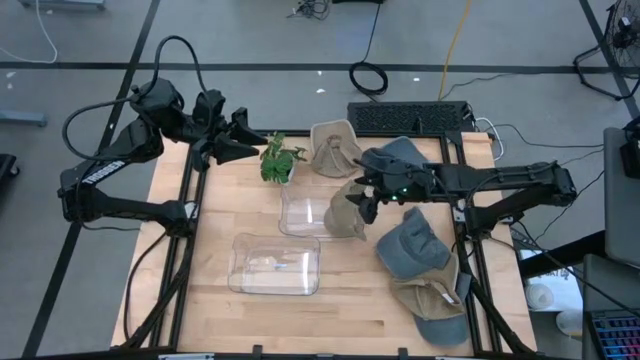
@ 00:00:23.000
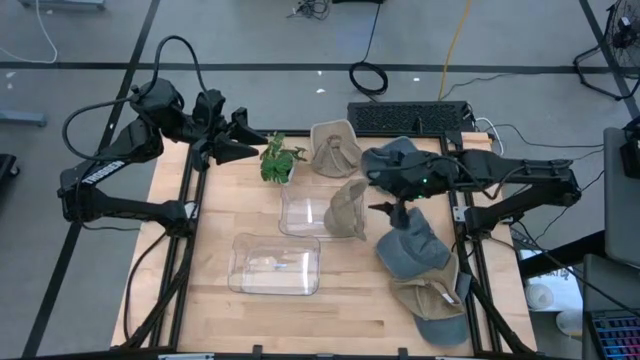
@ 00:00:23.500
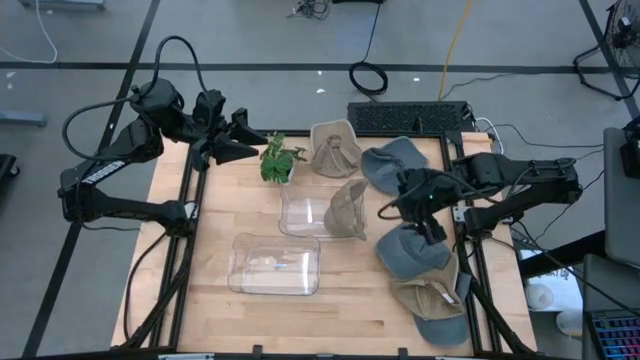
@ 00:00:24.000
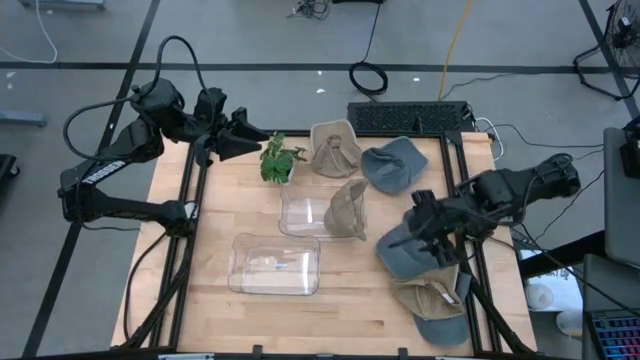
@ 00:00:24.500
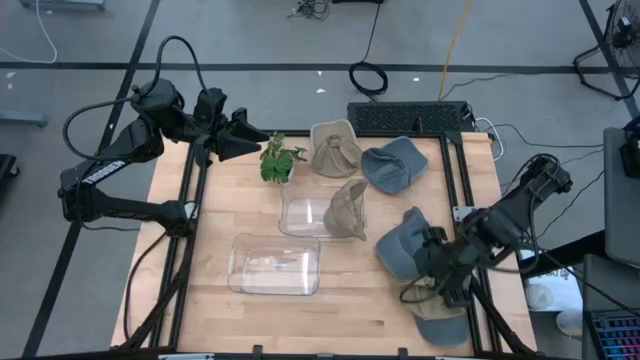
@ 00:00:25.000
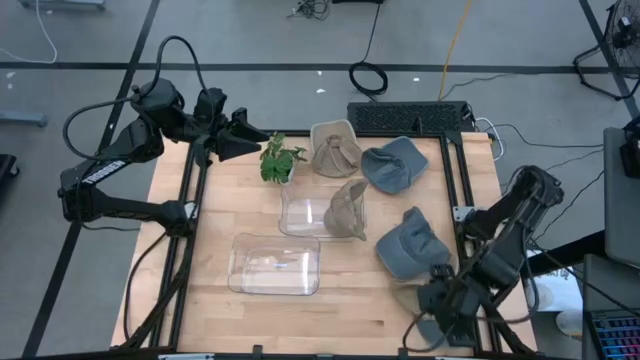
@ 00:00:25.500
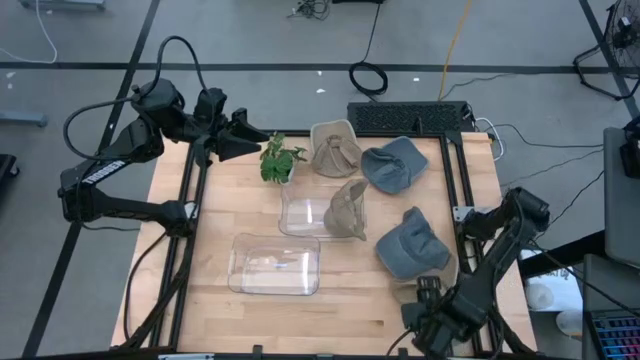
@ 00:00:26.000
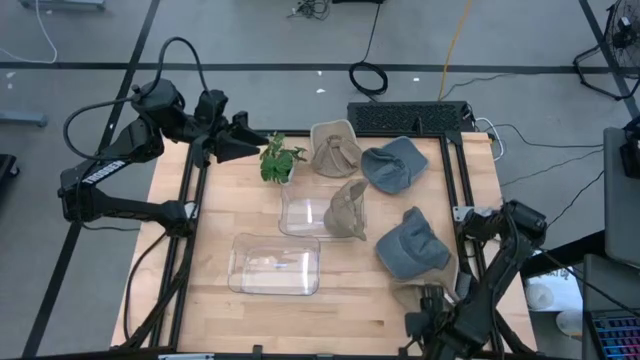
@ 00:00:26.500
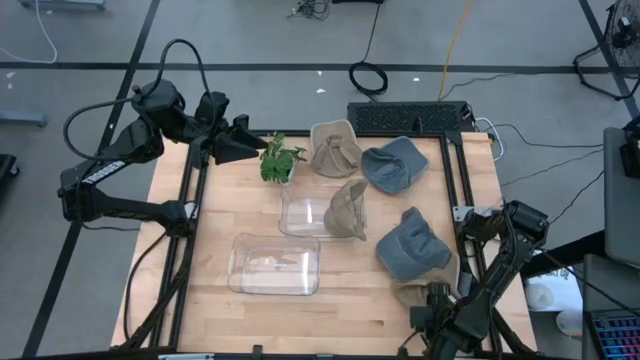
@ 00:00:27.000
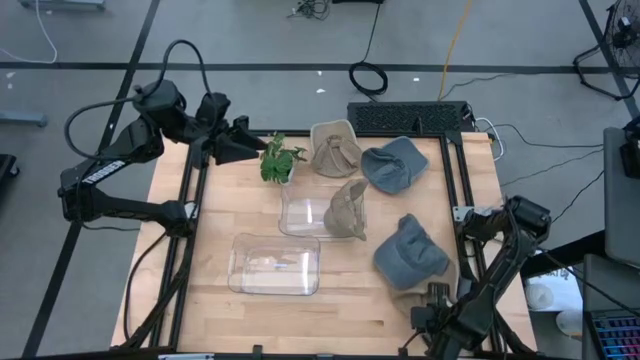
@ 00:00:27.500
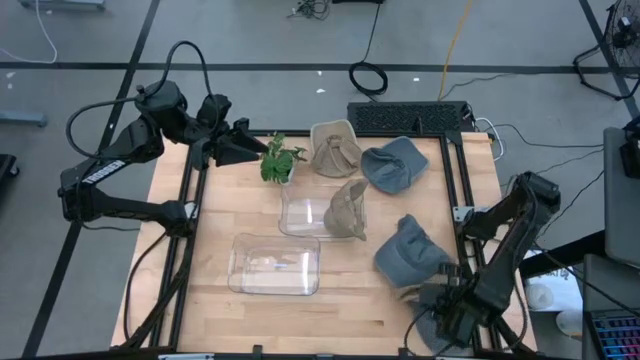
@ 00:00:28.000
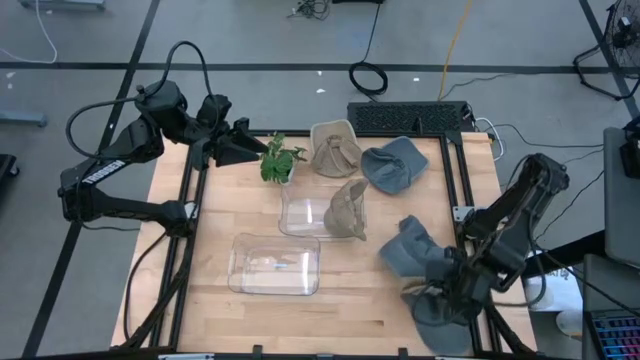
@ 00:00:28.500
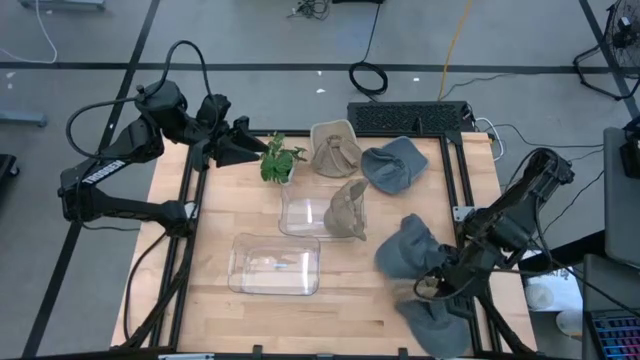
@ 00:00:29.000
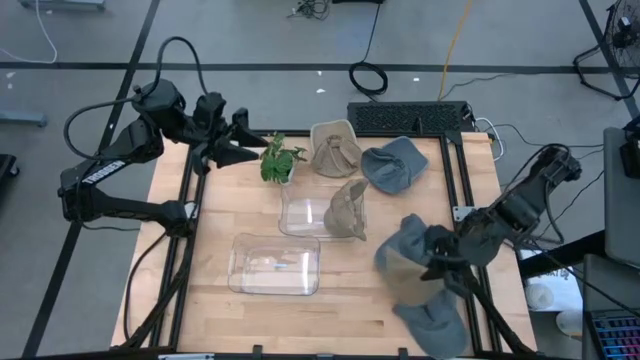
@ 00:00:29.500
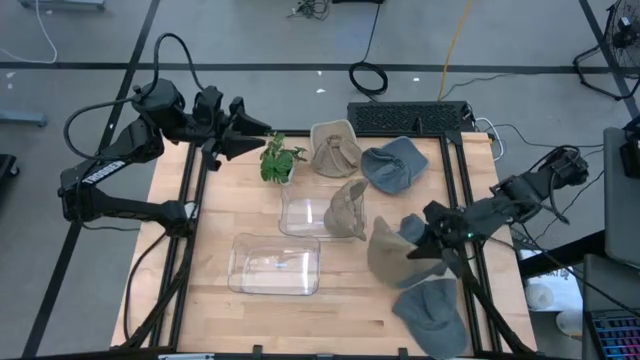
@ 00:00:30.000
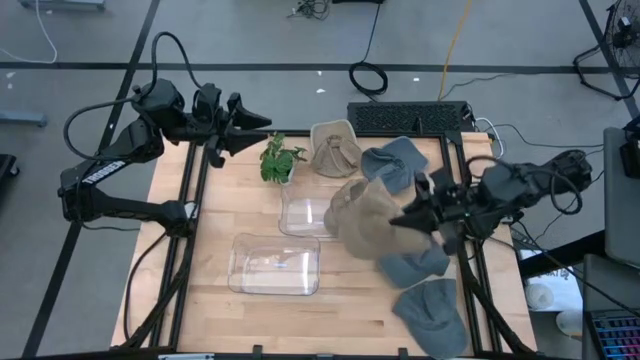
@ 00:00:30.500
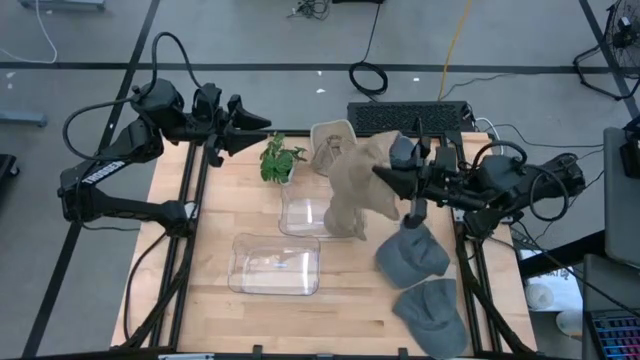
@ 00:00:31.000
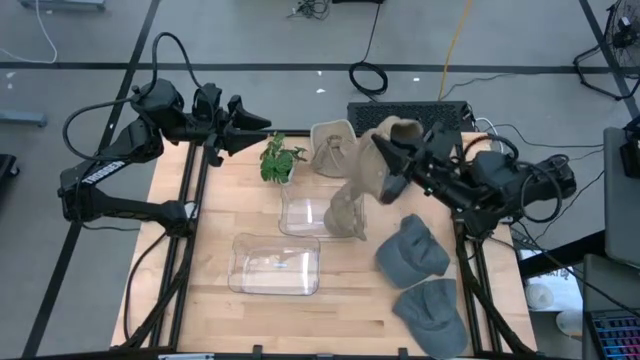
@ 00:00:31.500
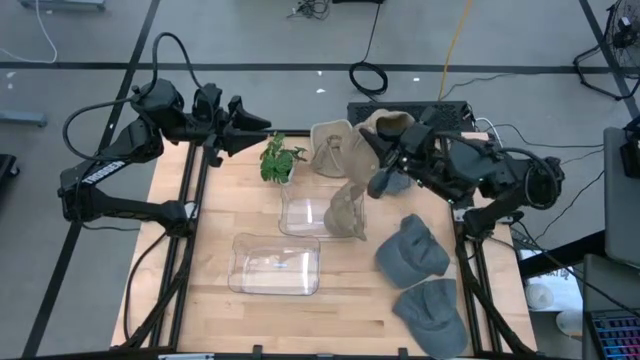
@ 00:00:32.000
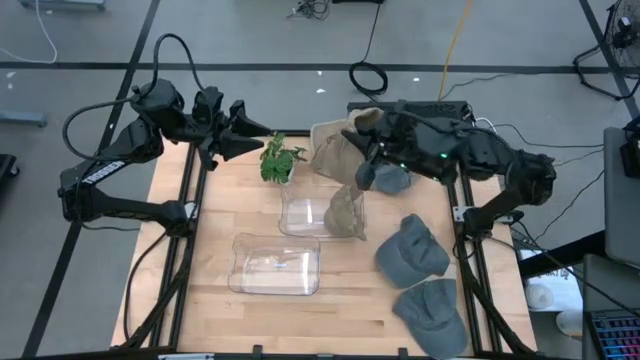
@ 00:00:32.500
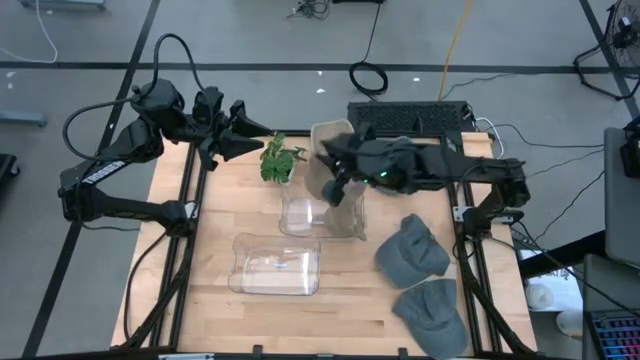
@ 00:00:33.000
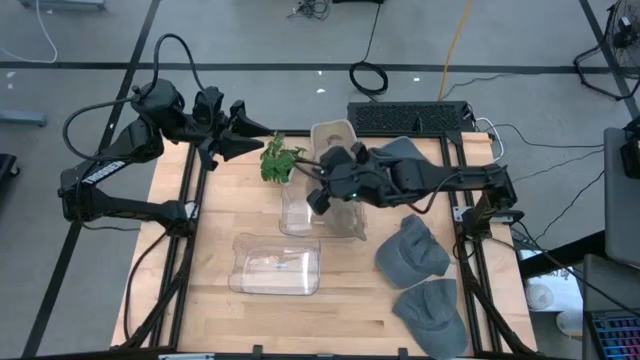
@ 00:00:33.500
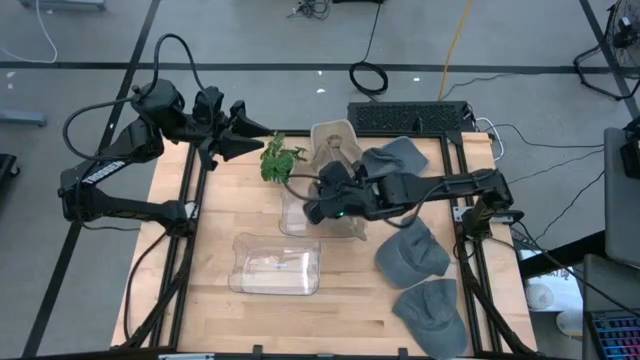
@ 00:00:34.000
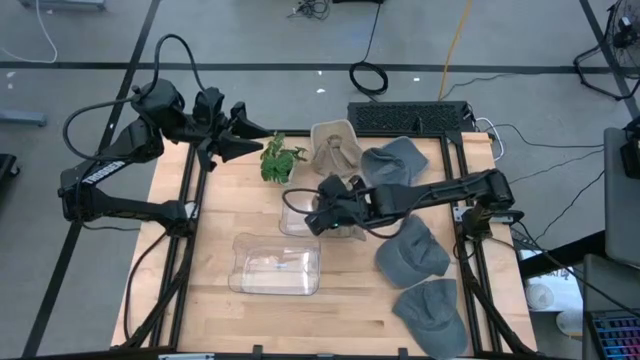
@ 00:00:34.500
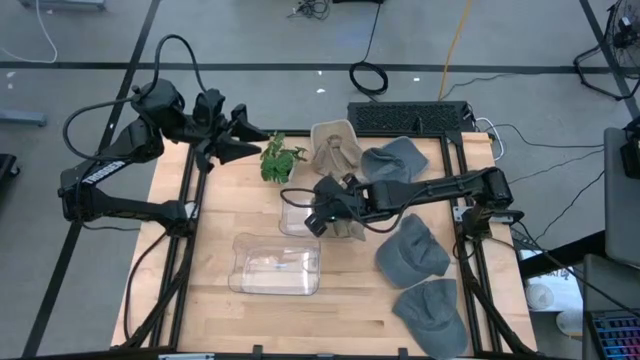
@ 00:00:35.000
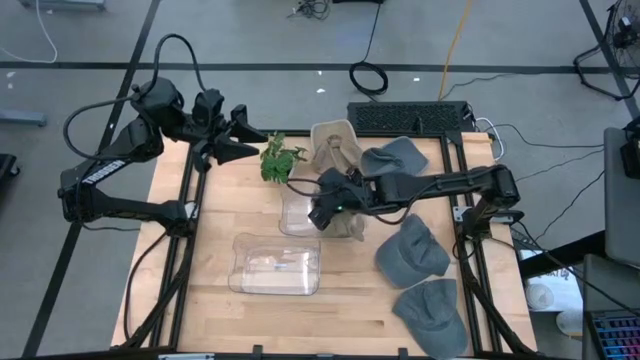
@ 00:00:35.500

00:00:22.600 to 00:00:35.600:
Task: Pick & Place hat
Put the bottom brown cap into the top transparent bin
